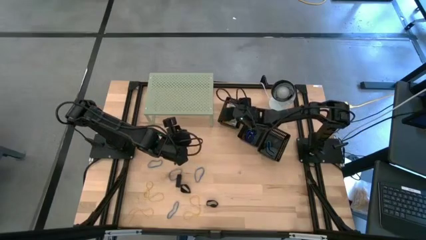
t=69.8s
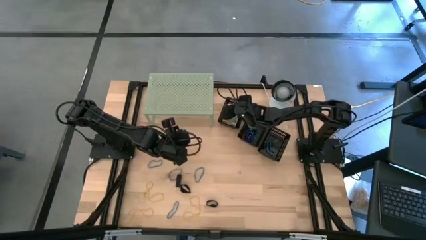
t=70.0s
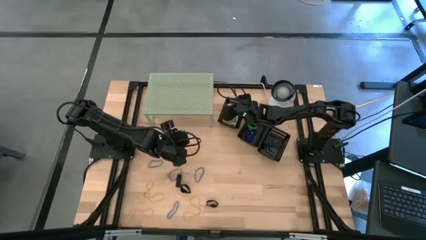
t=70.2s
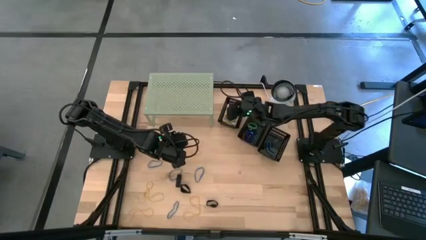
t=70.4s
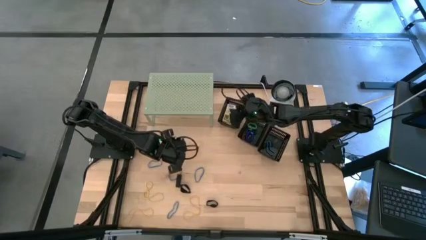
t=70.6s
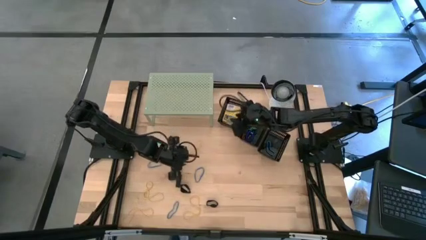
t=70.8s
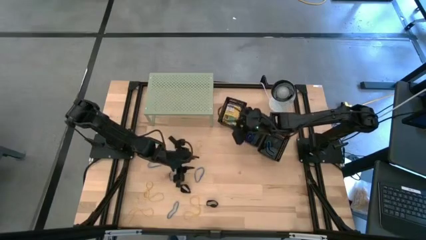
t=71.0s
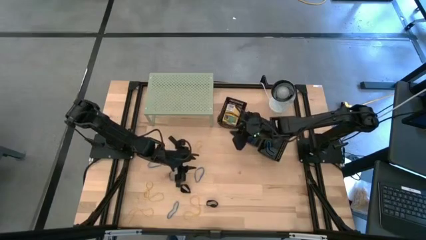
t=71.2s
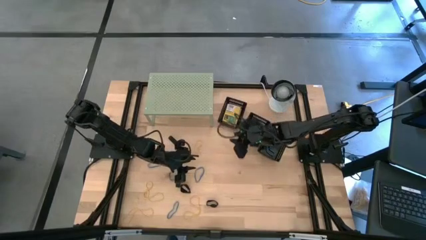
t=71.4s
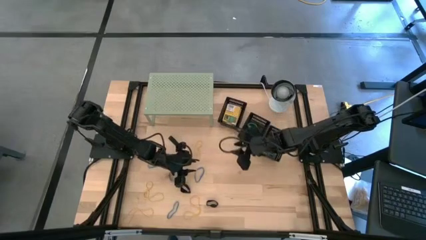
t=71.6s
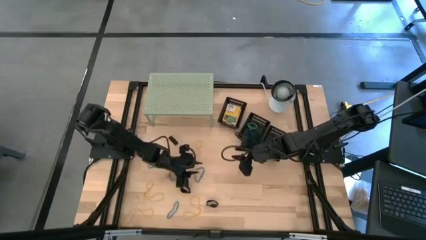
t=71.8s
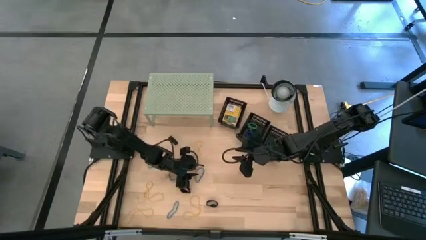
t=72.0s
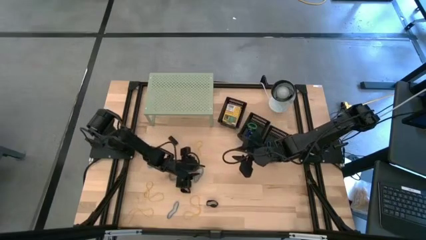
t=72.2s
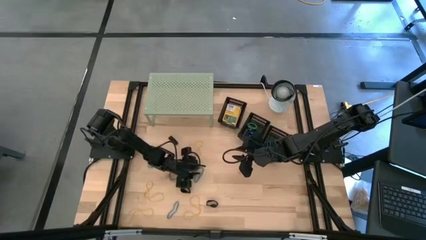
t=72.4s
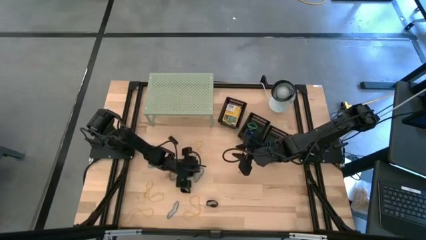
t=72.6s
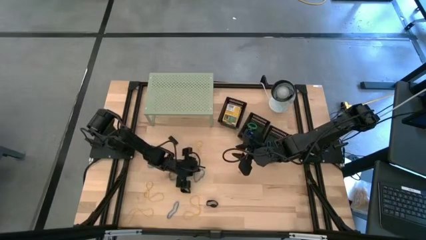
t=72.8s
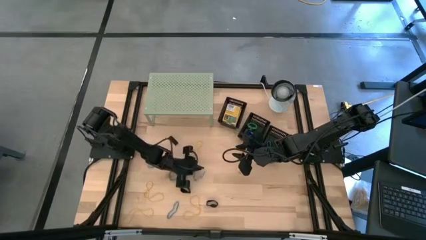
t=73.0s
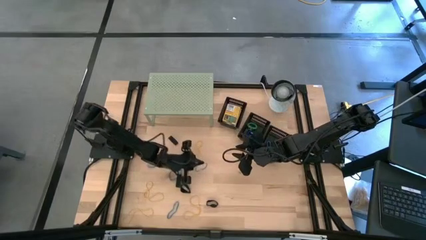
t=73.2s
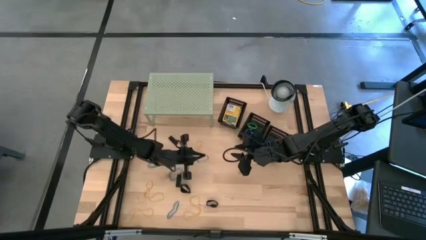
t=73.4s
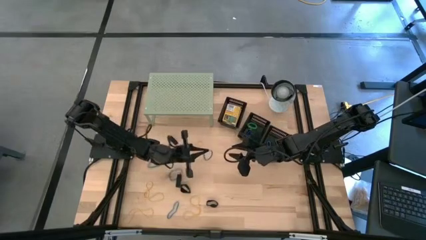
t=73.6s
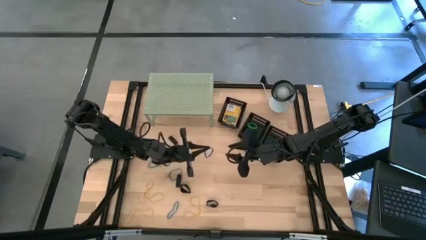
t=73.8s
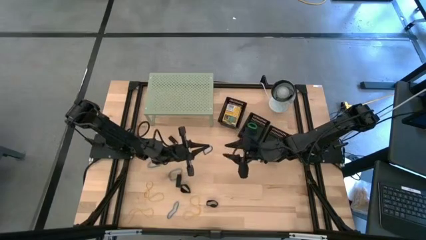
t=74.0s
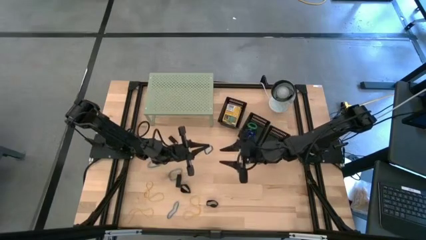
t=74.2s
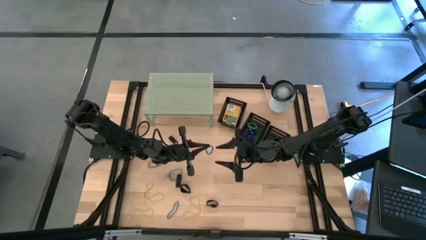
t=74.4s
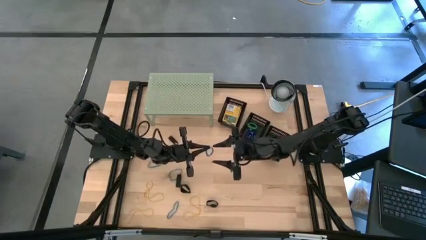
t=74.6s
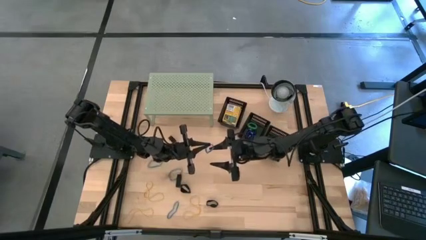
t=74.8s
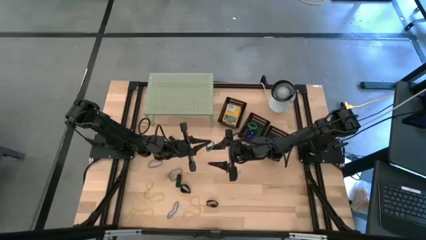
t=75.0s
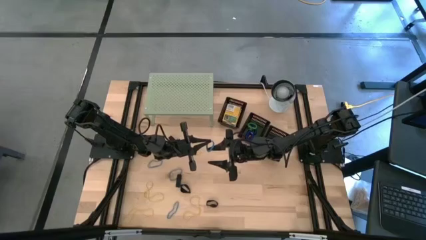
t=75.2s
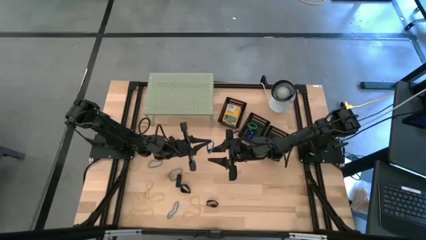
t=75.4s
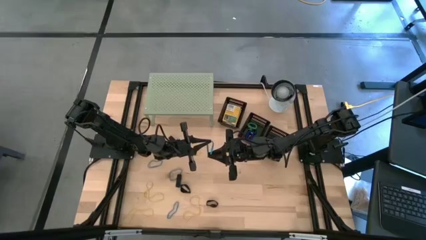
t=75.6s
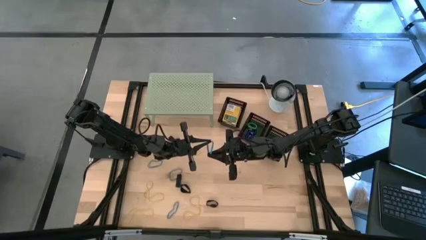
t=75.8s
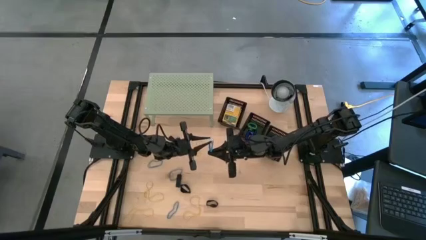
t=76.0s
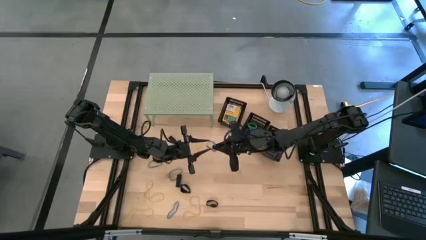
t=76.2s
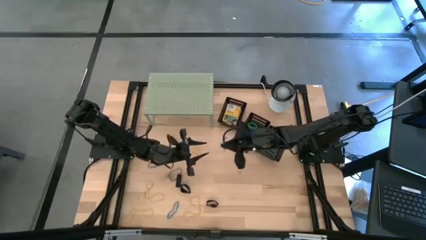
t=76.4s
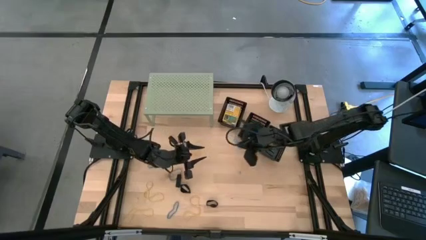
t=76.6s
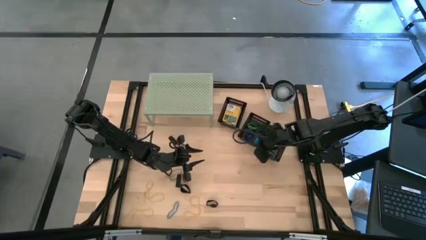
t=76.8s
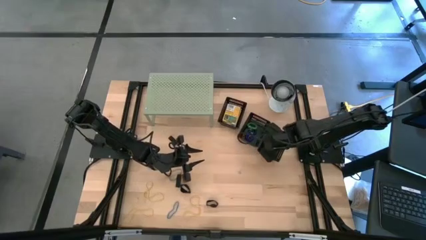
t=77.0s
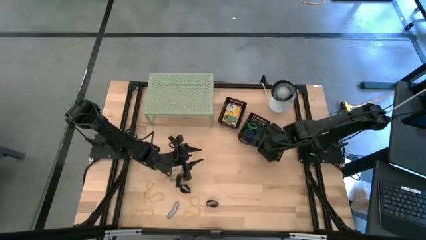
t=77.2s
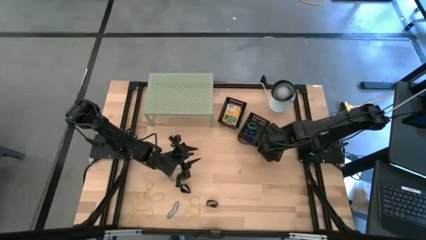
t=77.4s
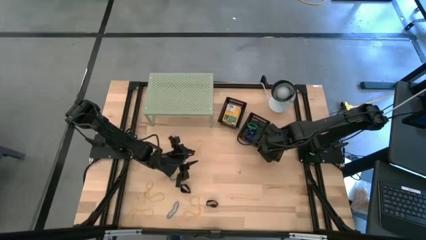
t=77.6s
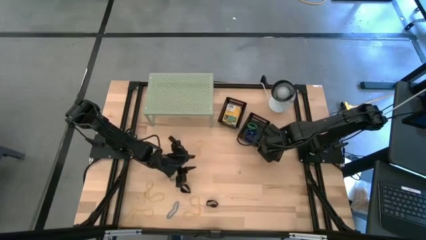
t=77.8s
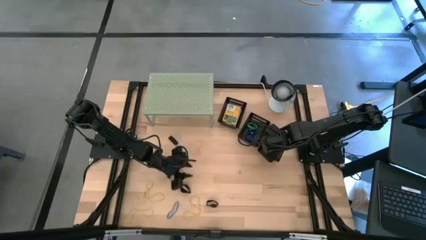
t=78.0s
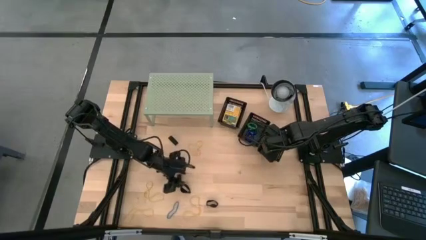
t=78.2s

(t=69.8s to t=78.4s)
Task: Pick & Place Office Desk Supplies
Put the blue rubber band into the bottom black bin

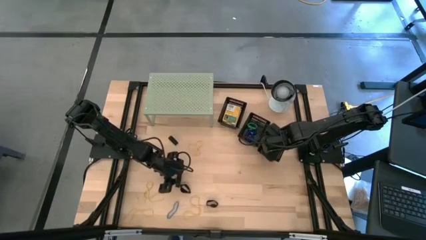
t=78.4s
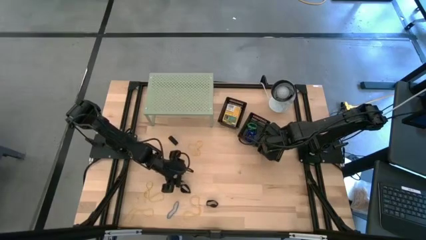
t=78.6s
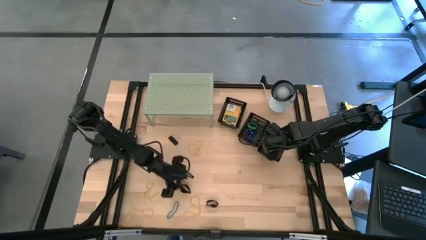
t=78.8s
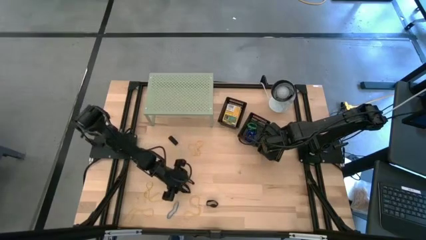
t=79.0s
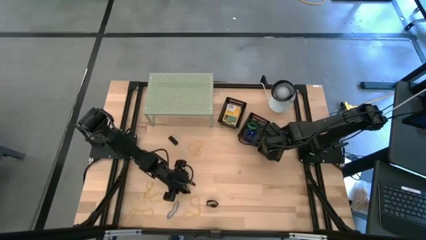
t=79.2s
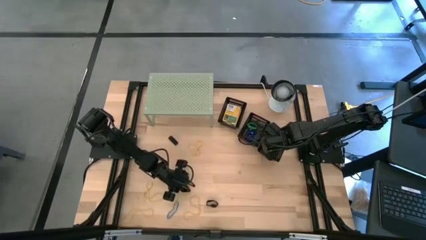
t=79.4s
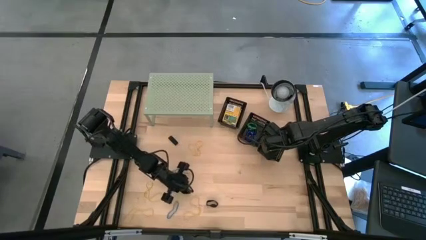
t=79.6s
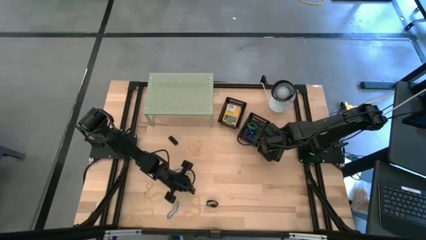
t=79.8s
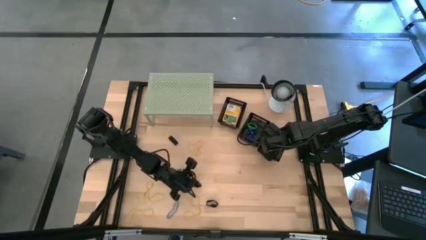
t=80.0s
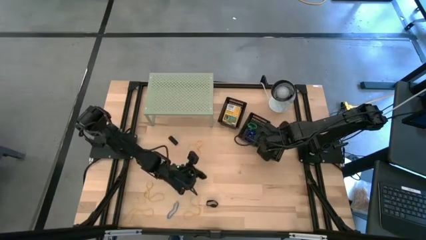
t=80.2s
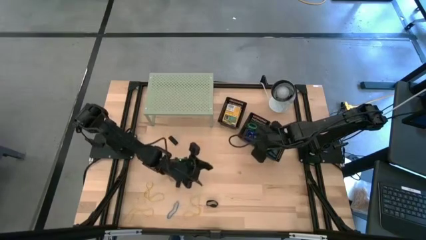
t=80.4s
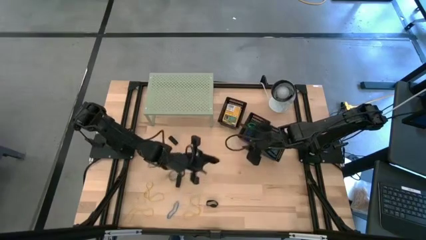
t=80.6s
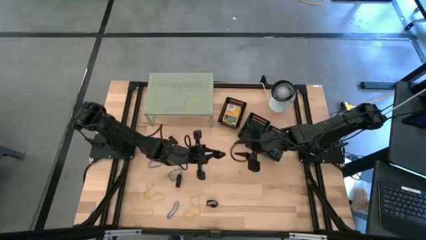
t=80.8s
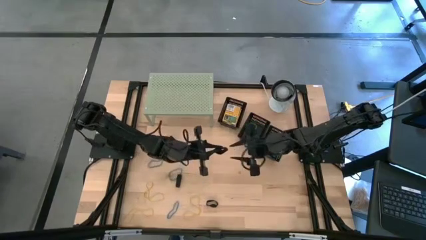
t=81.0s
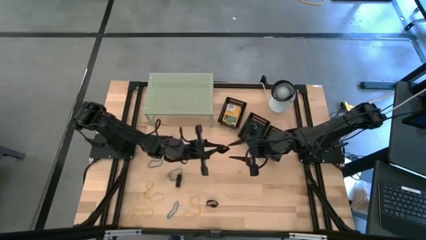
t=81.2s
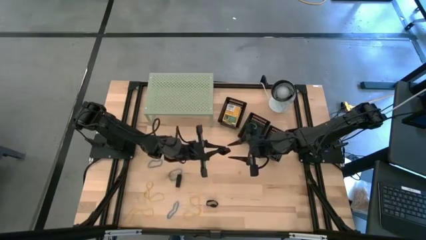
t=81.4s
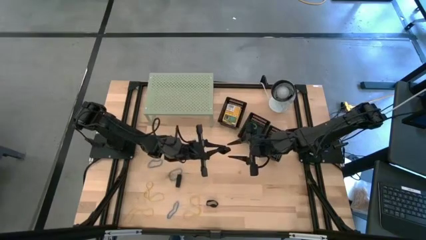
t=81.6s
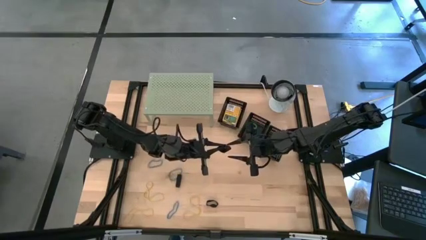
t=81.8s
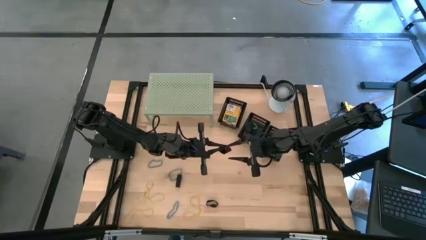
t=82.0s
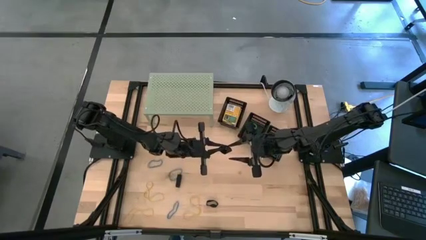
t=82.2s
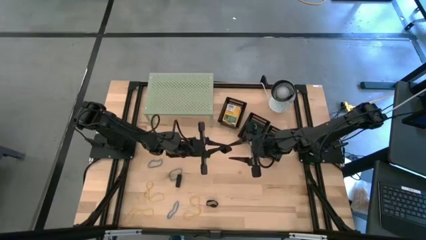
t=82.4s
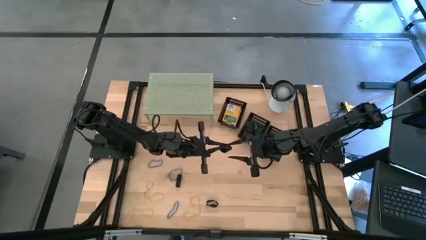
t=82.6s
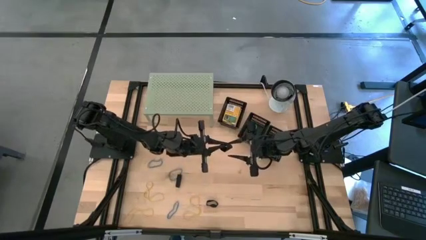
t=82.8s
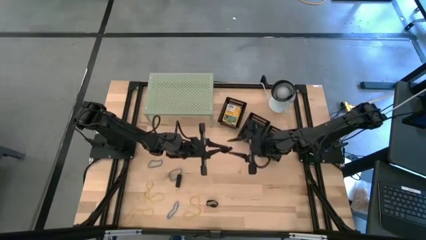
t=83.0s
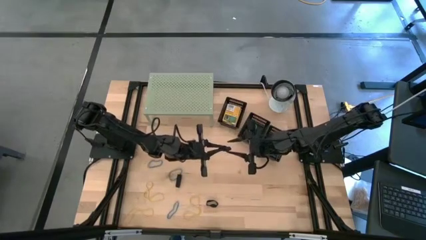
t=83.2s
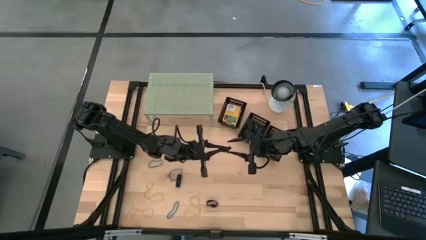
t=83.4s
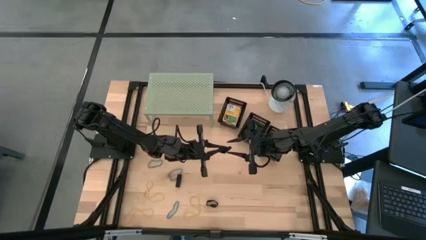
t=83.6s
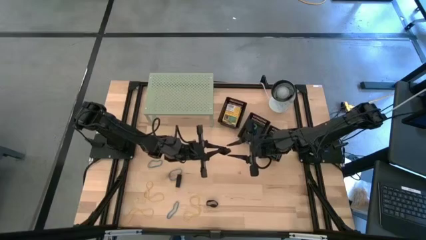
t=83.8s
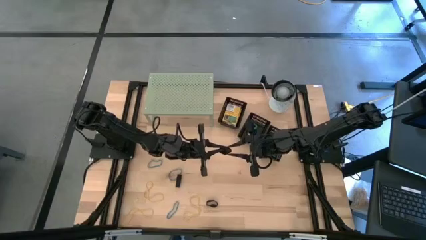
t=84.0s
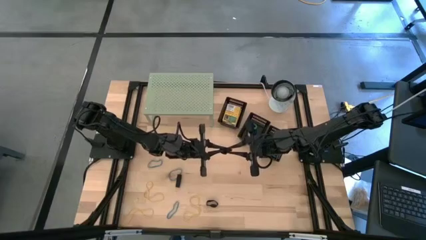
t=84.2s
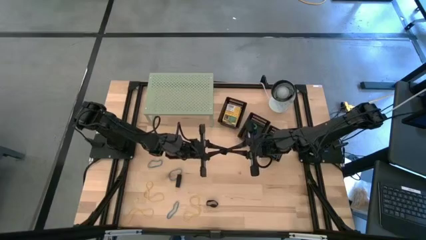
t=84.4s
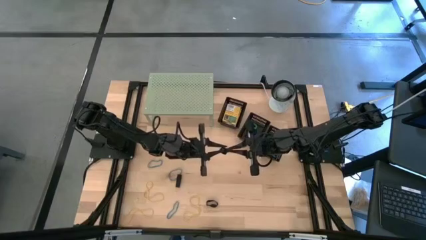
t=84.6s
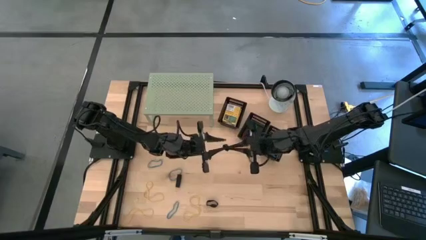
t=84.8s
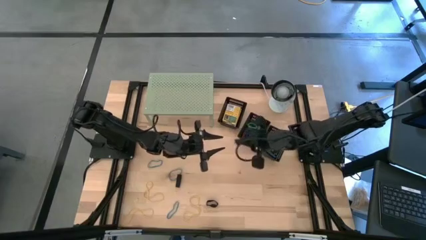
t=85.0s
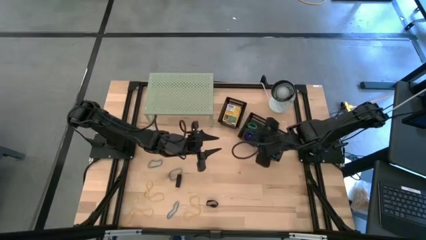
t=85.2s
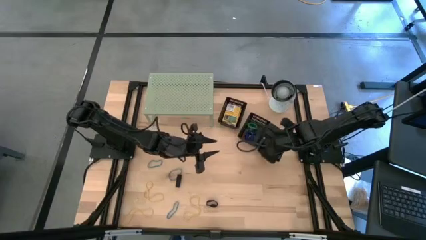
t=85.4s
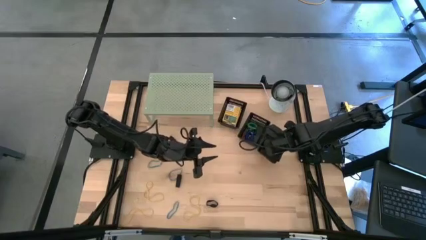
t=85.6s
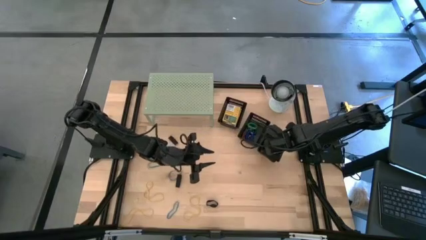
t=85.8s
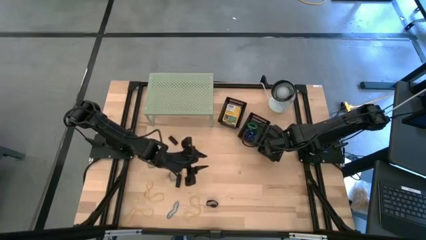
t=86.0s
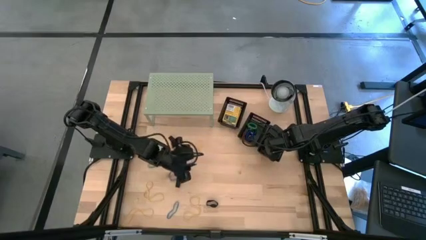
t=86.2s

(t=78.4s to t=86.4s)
Put the black rubber band into the bottom black bin
